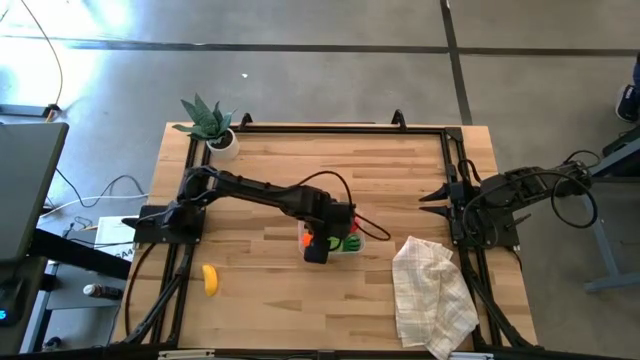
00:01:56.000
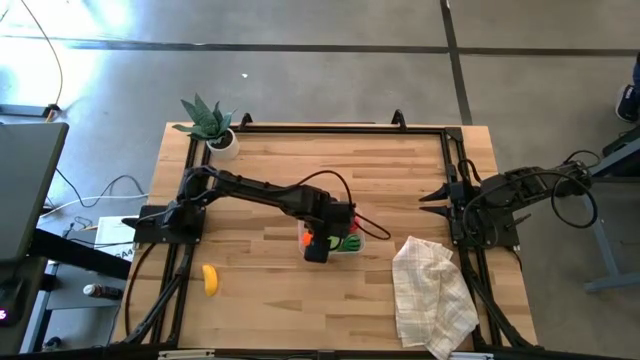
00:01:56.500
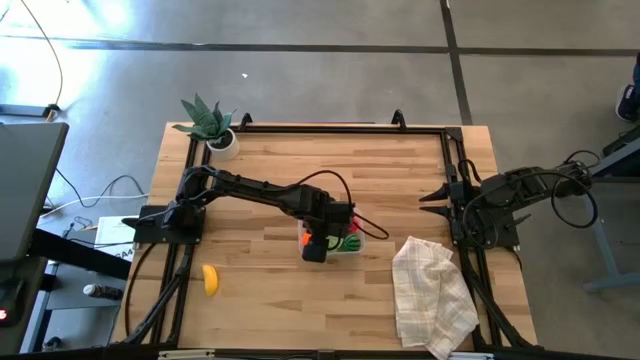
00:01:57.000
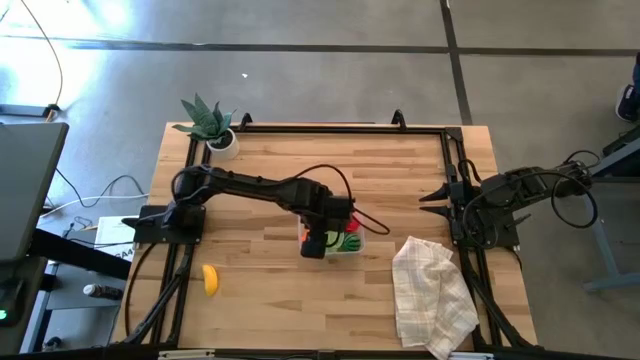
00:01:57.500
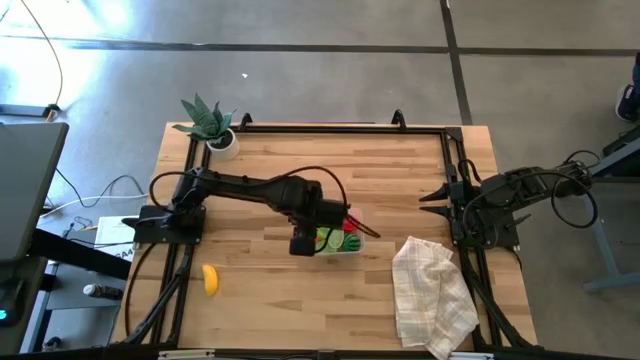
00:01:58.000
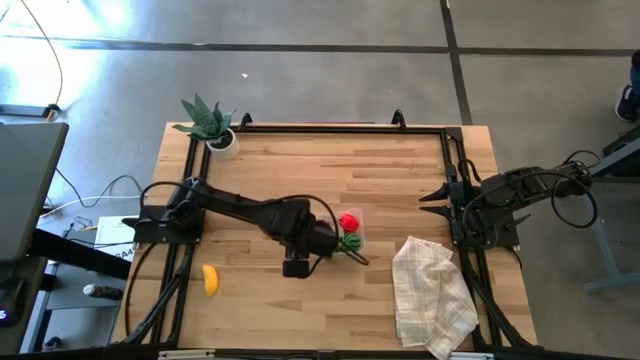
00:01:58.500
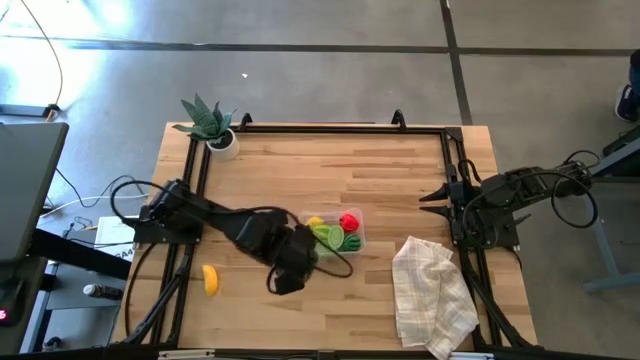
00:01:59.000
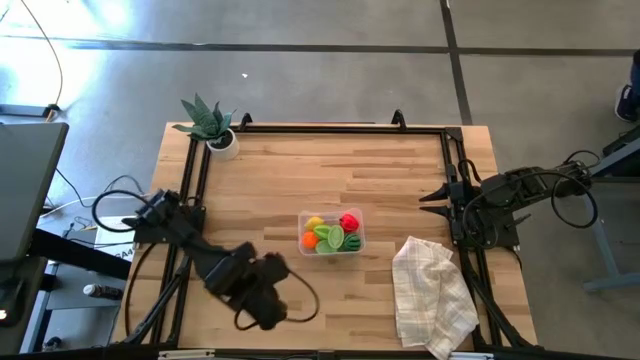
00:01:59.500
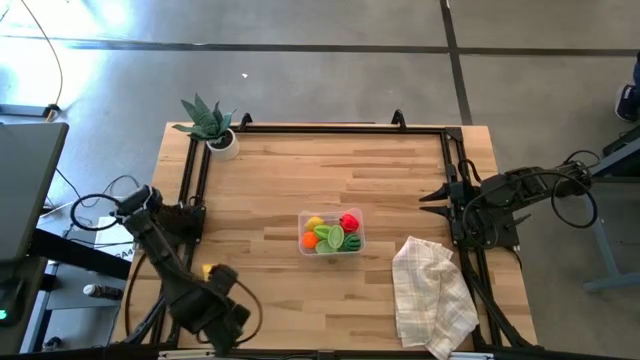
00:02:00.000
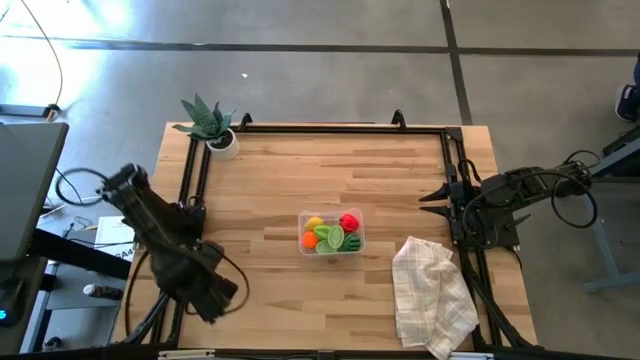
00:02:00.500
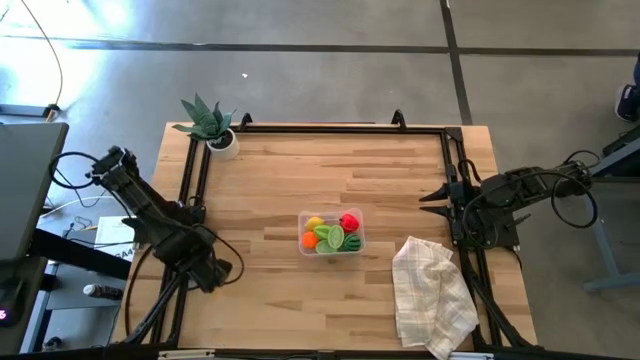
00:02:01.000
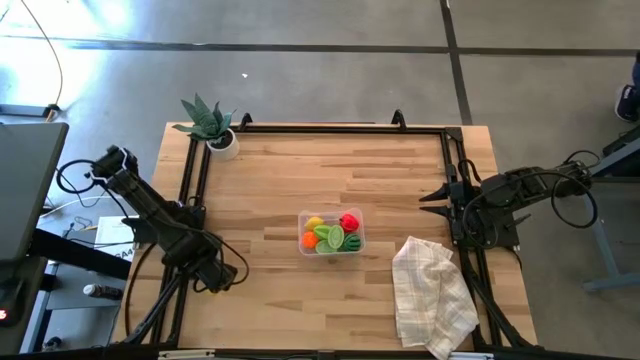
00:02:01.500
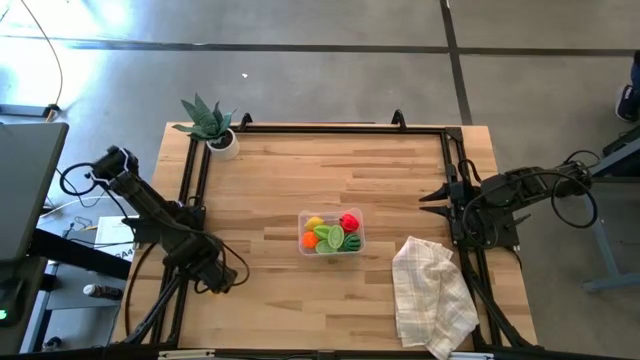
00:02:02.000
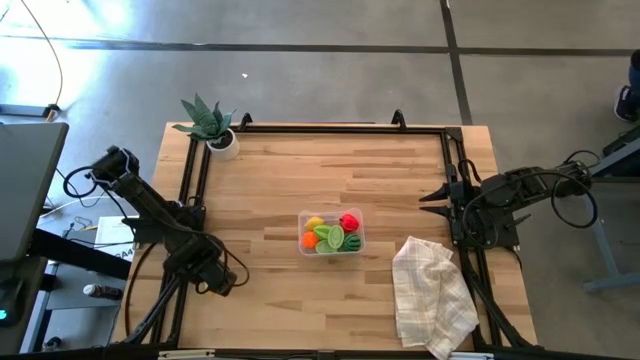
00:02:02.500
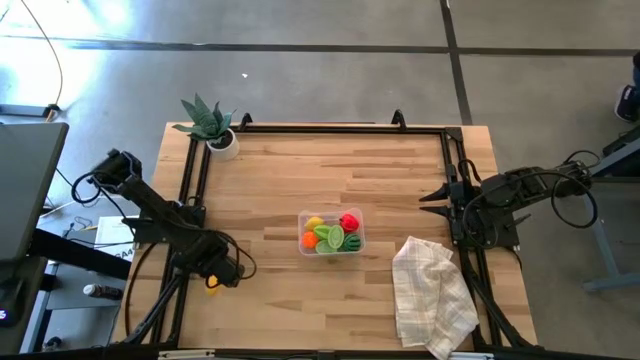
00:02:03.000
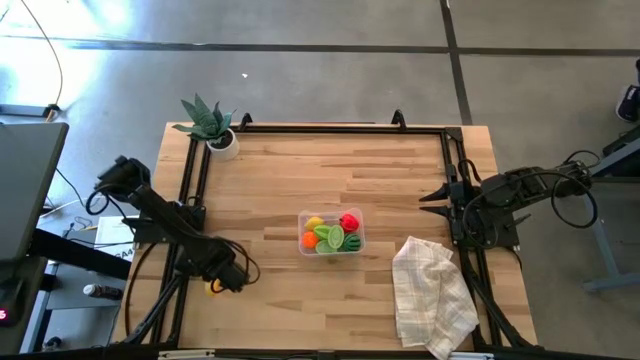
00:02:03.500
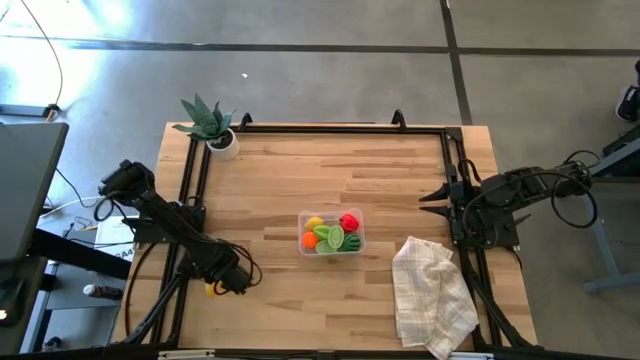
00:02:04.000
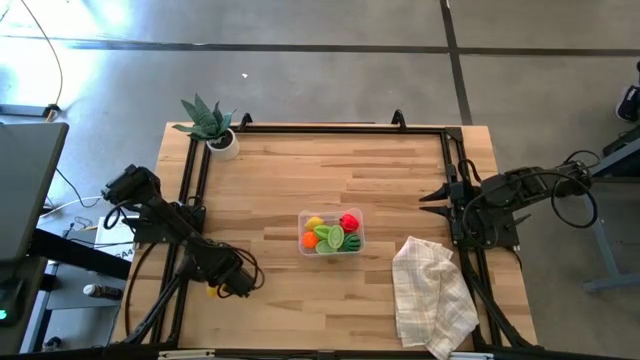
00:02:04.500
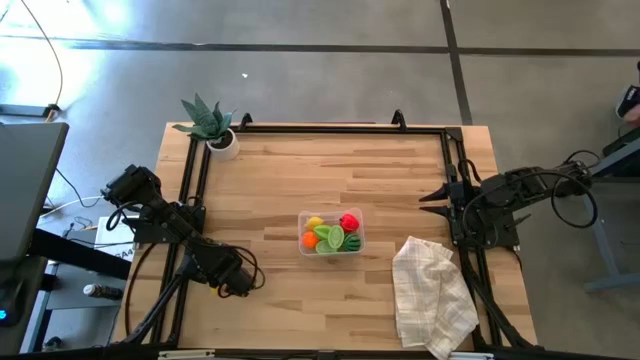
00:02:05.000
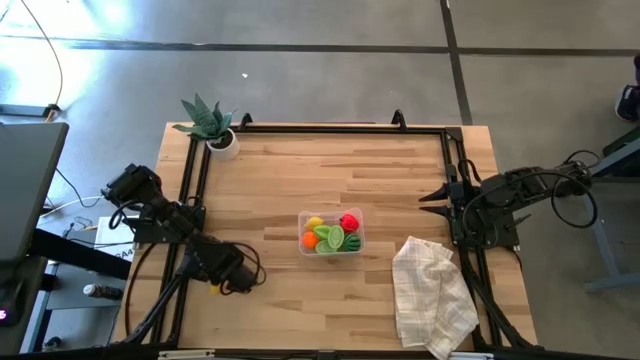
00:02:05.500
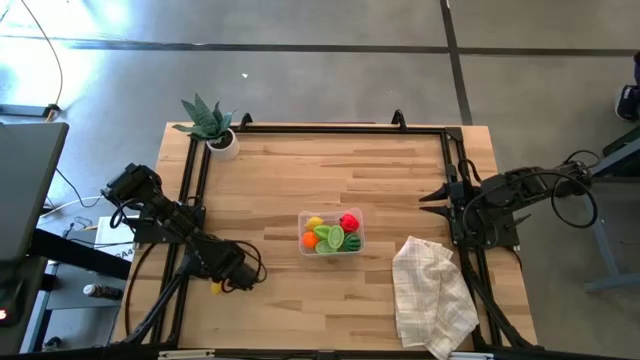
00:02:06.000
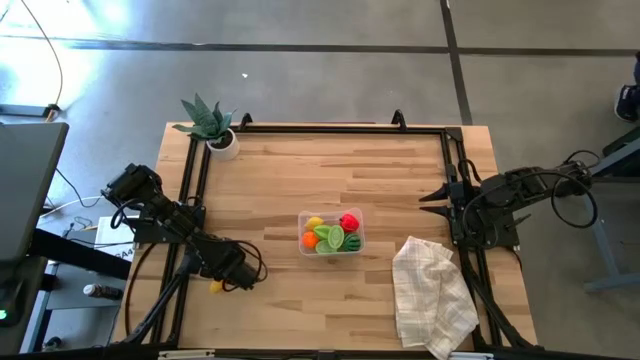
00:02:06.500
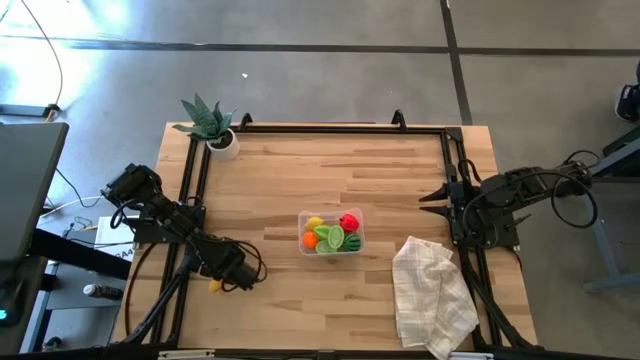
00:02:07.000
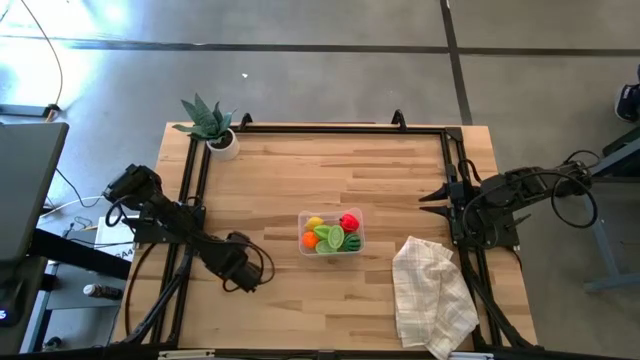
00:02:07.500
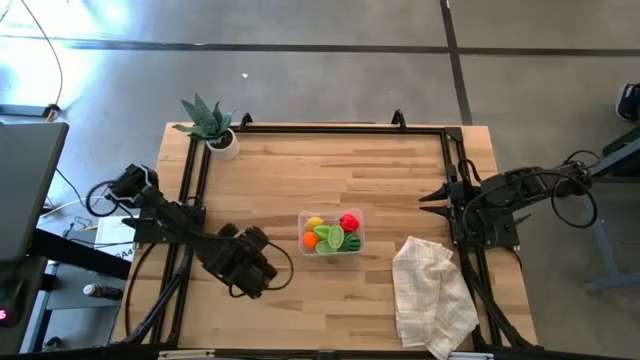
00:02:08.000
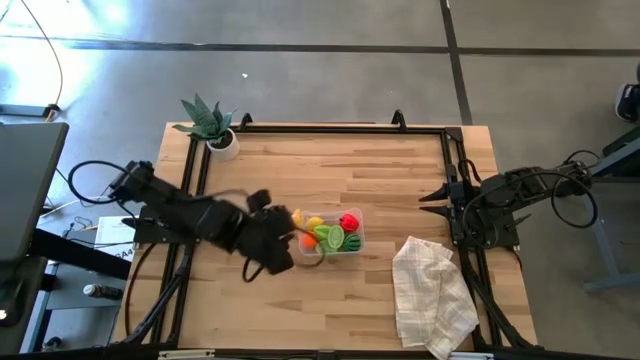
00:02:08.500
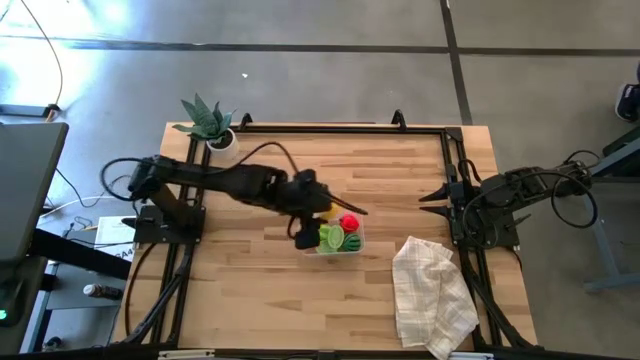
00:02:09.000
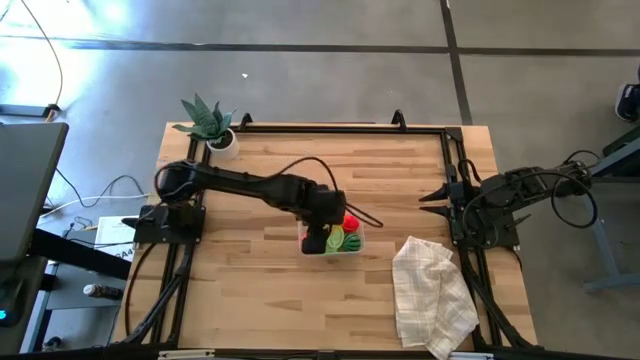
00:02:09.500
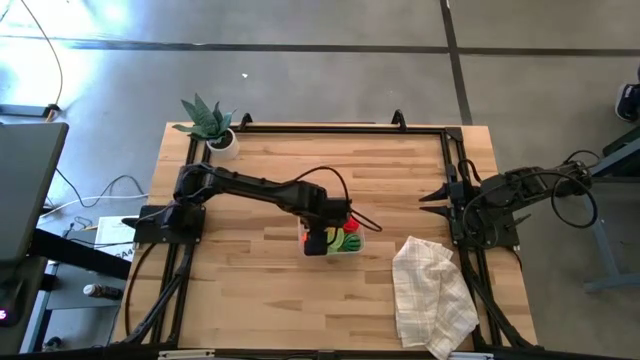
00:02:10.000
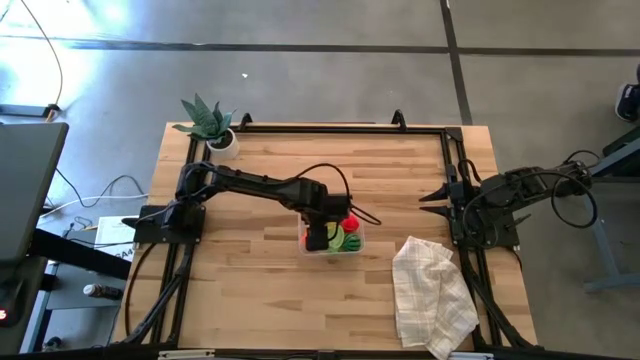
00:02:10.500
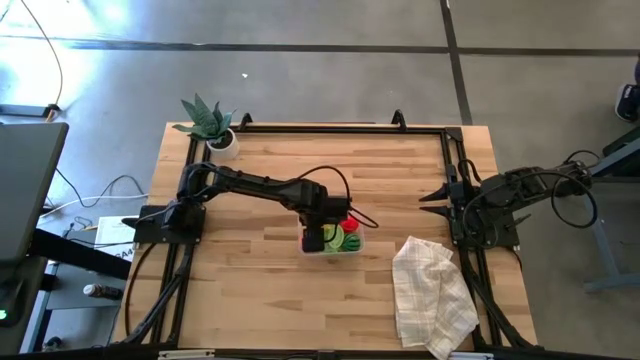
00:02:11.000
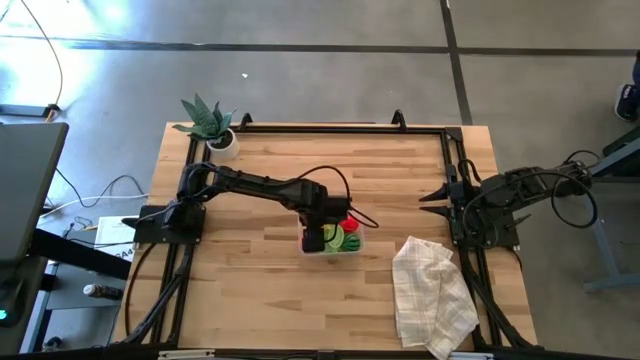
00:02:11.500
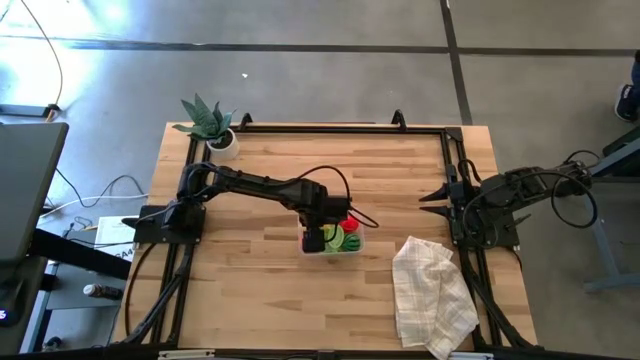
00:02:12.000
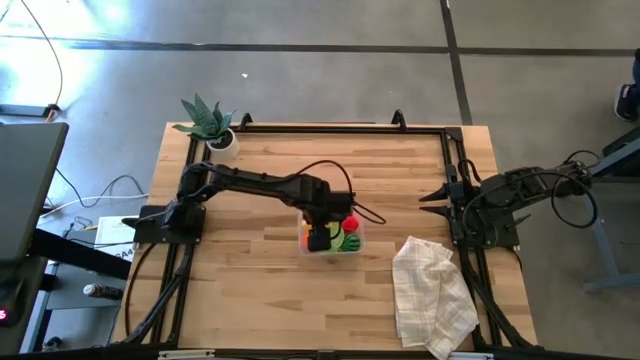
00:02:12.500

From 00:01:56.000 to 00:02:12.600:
Task: Pick and placing Produce into tupperware
Put the yellow banana into the transparent bin

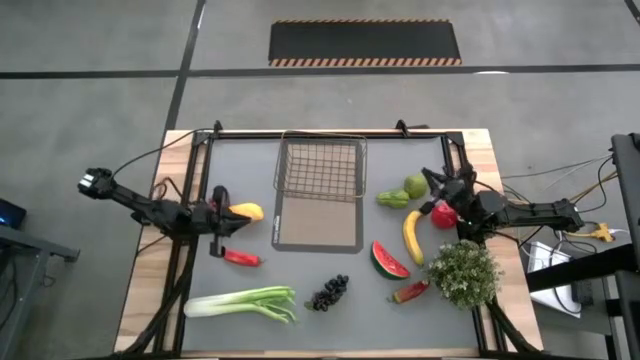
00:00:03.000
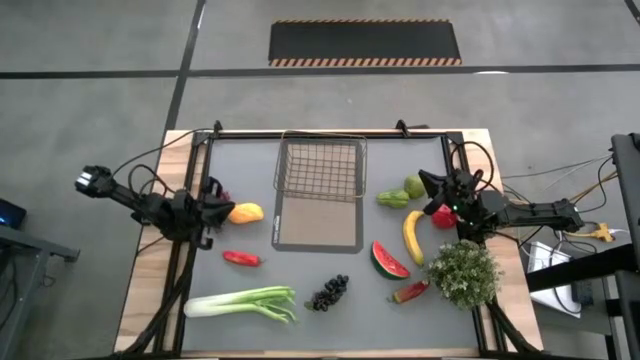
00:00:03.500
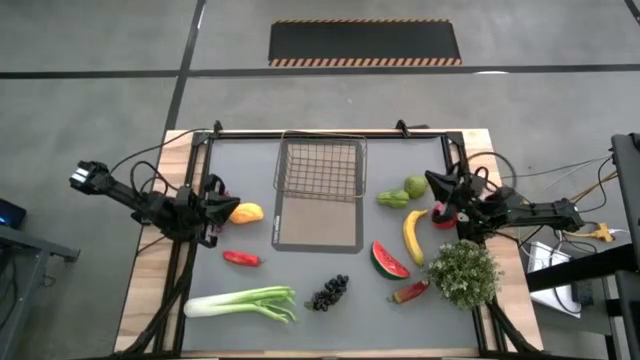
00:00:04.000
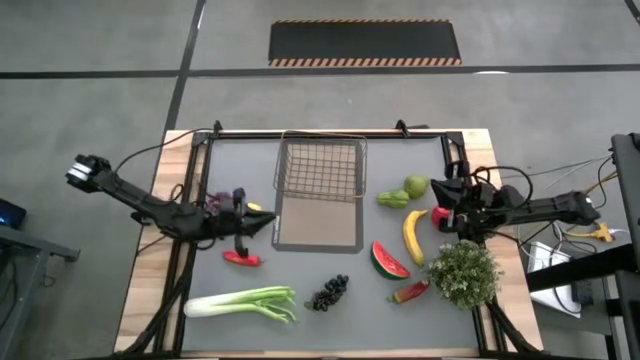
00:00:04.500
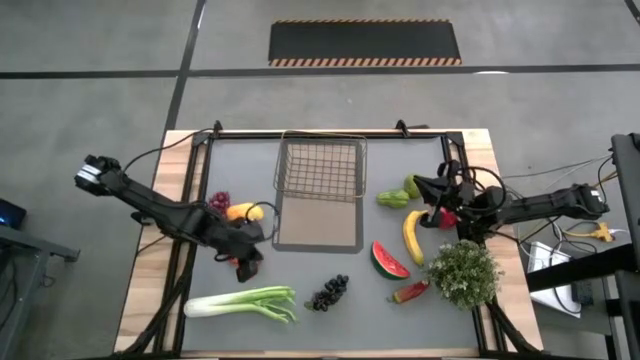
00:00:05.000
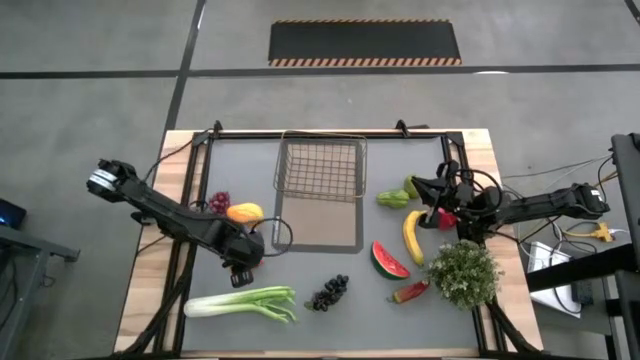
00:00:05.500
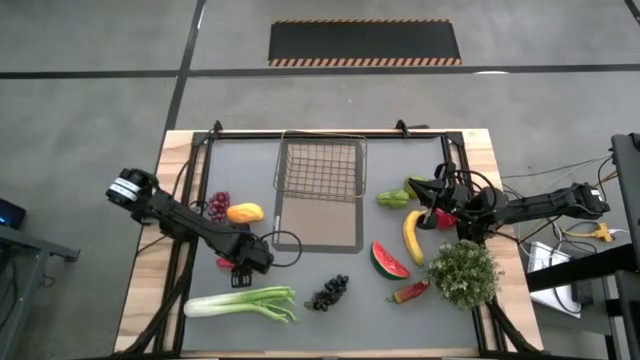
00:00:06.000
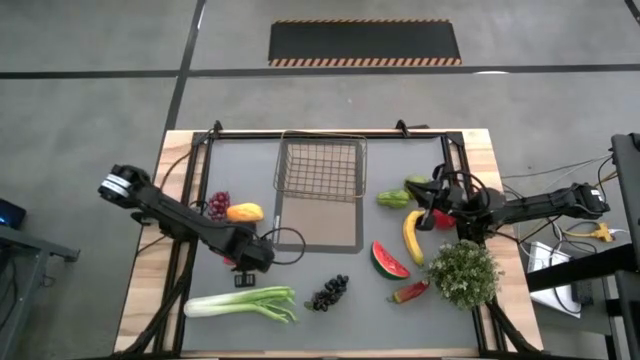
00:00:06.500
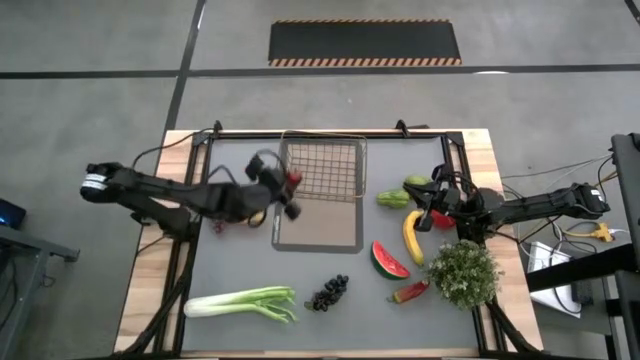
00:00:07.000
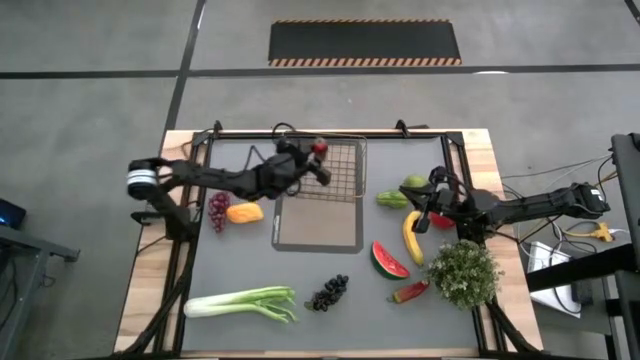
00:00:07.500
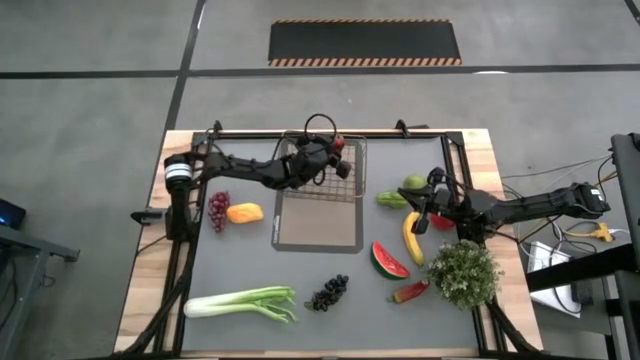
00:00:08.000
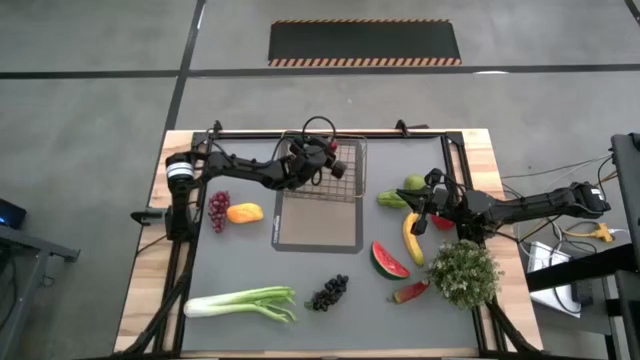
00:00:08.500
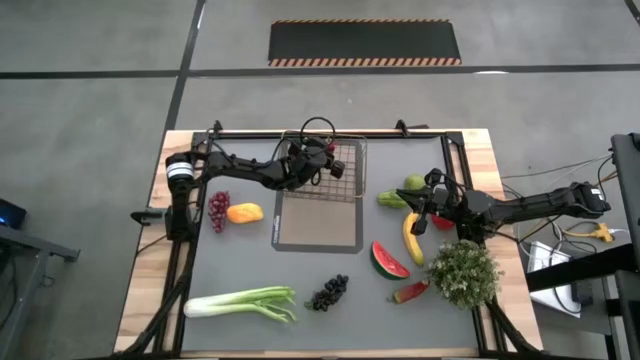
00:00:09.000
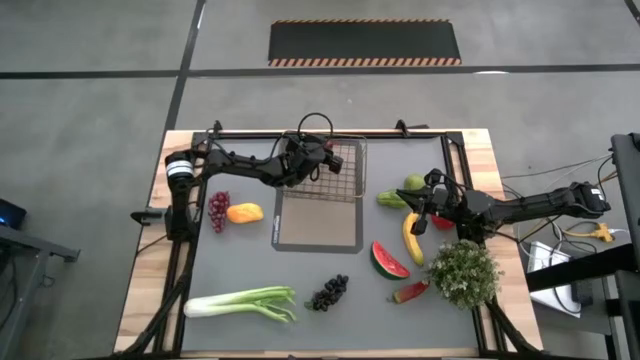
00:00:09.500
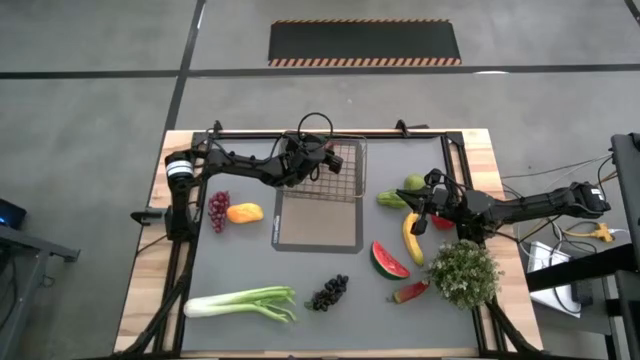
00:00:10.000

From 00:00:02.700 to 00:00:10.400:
Task: Build produce basket
Put the left red chili pepper into the wire basket
